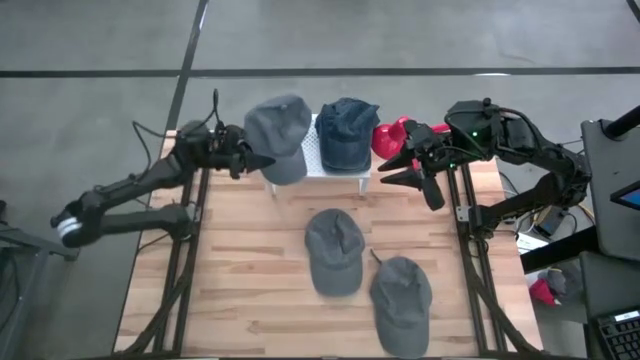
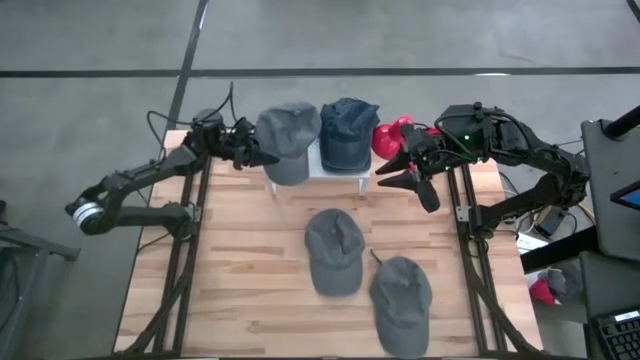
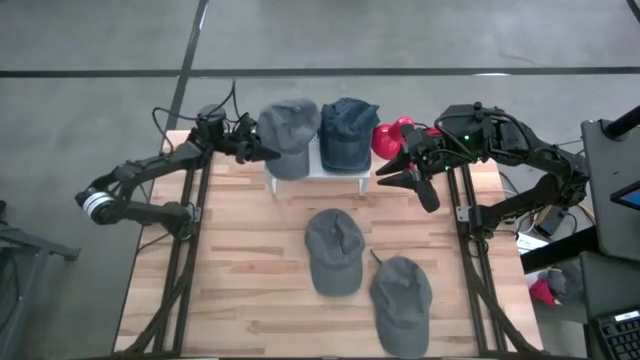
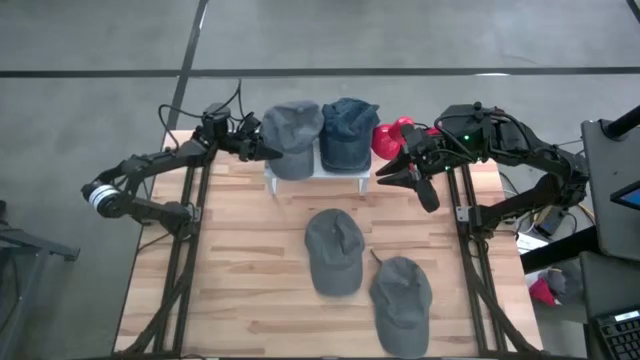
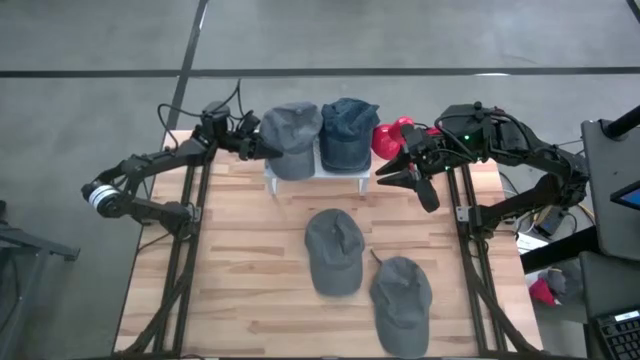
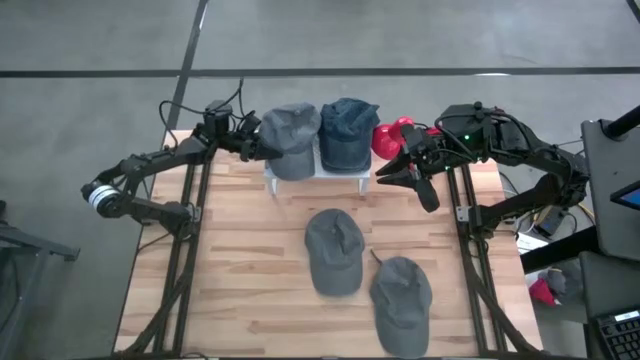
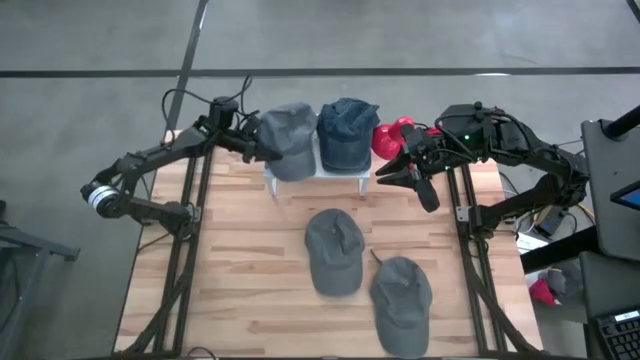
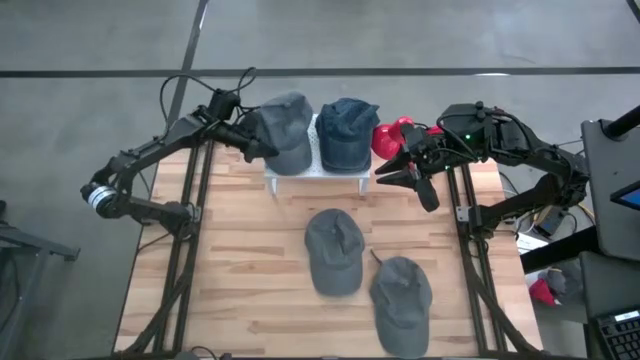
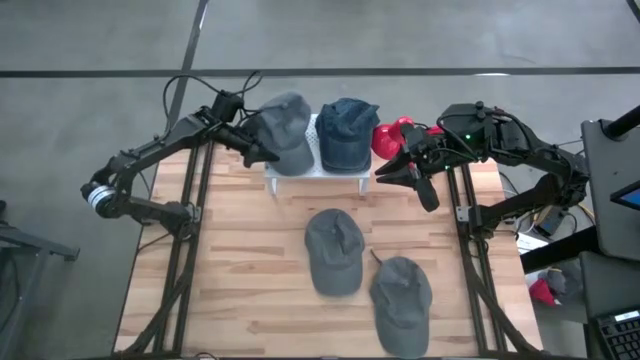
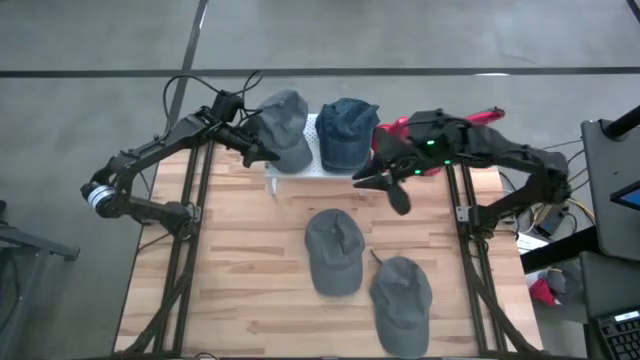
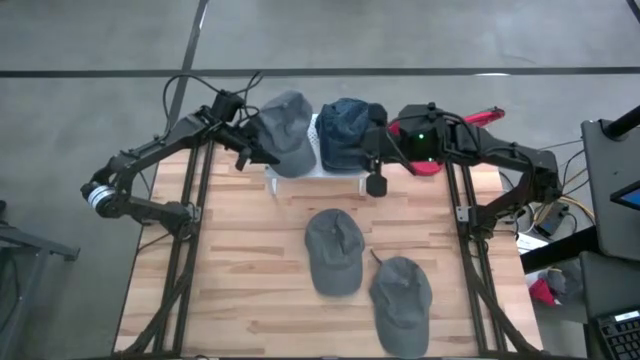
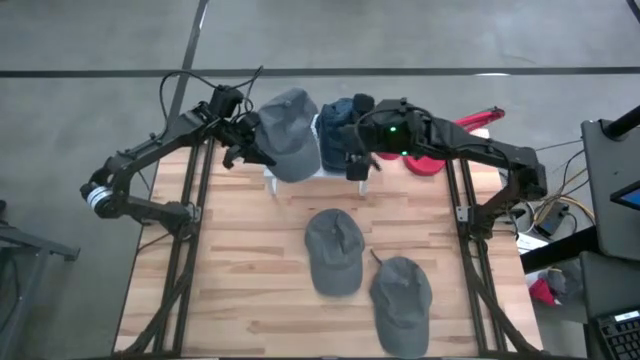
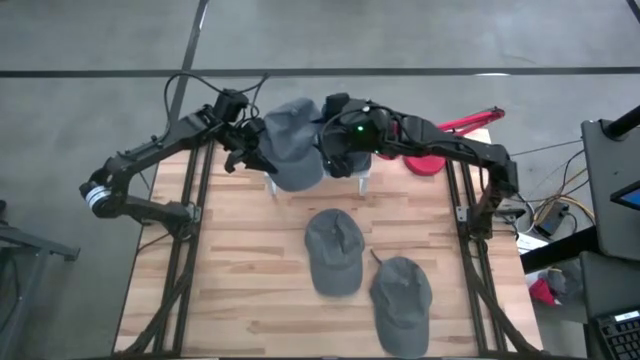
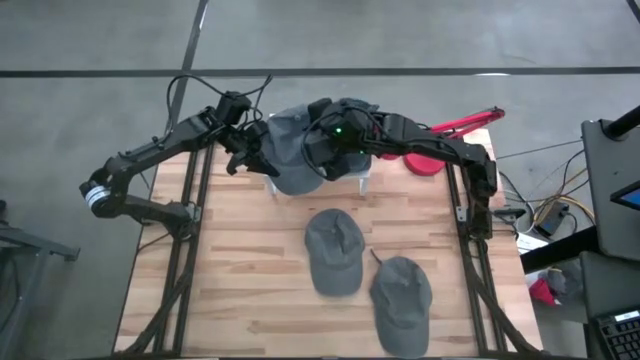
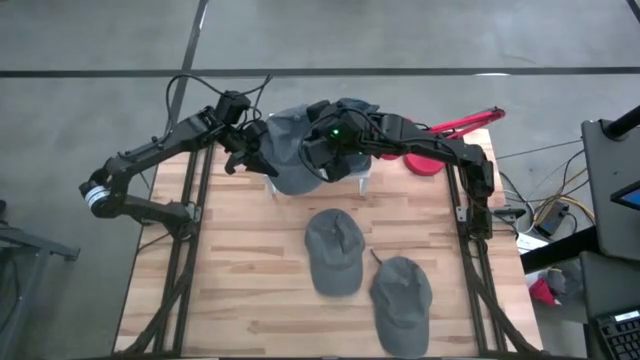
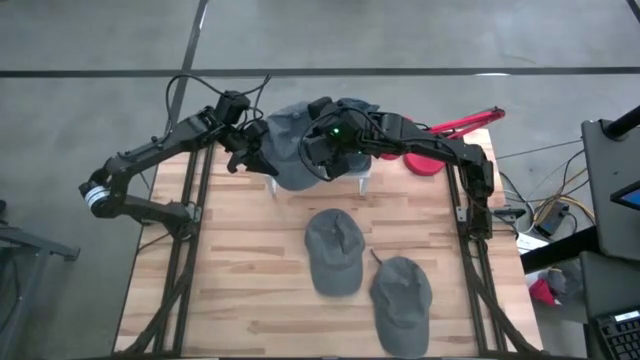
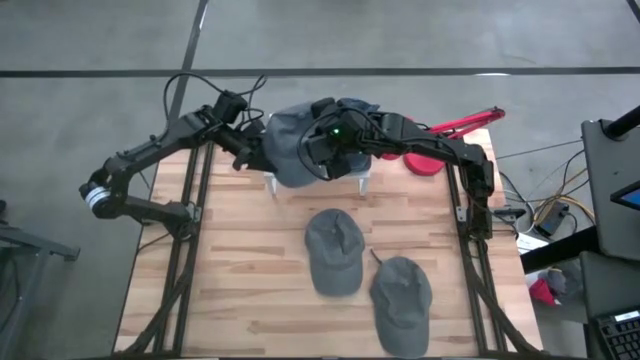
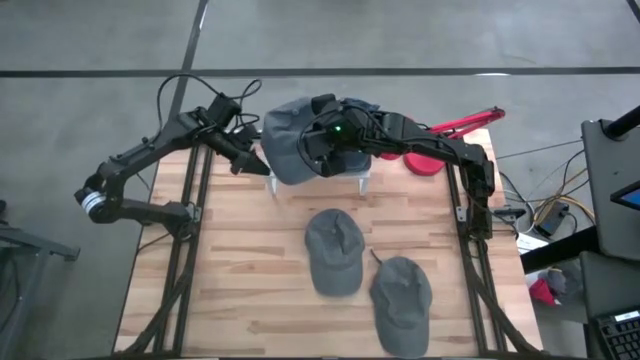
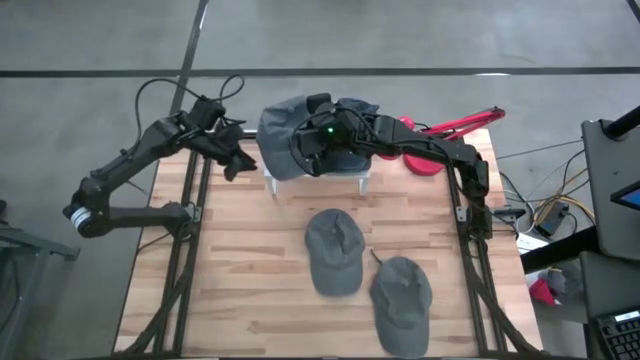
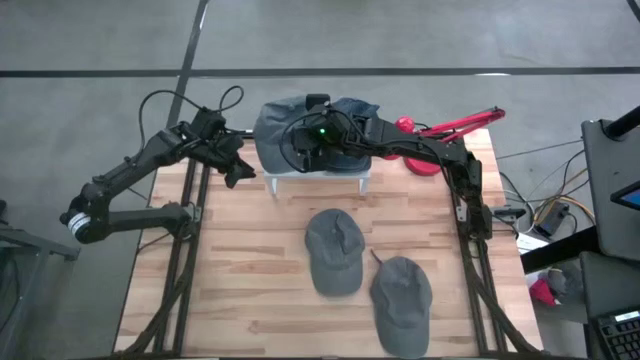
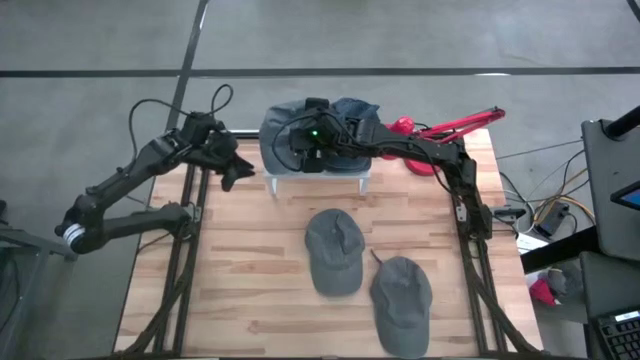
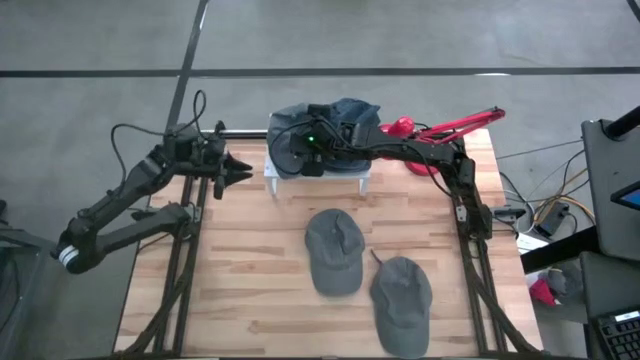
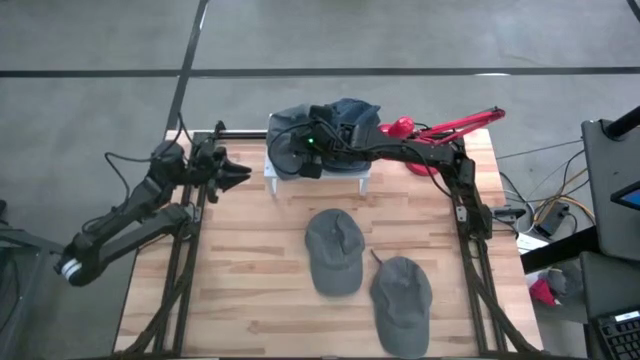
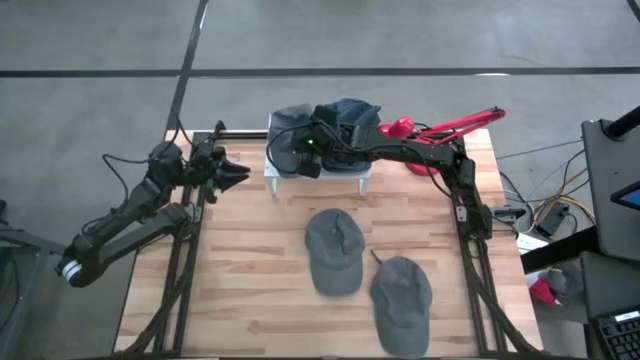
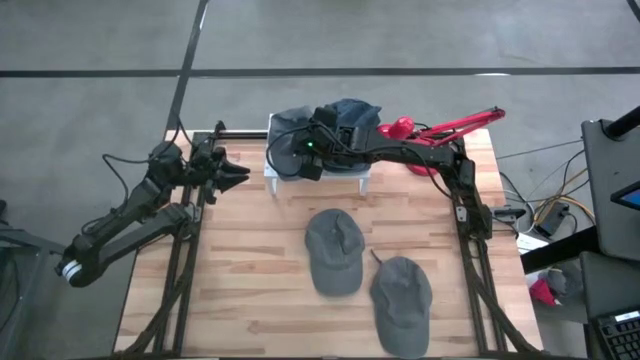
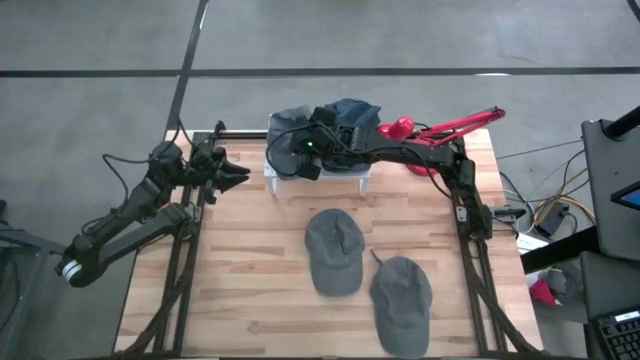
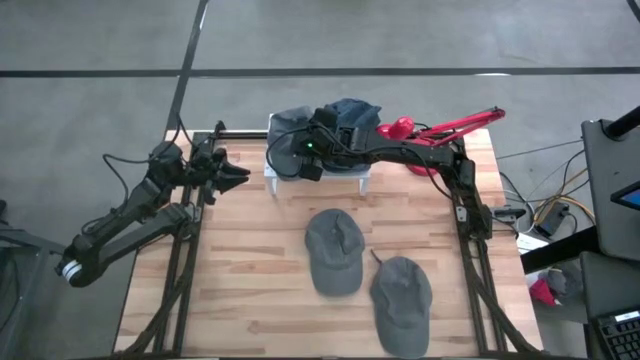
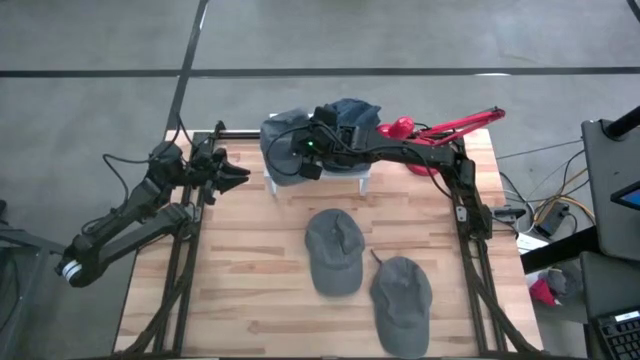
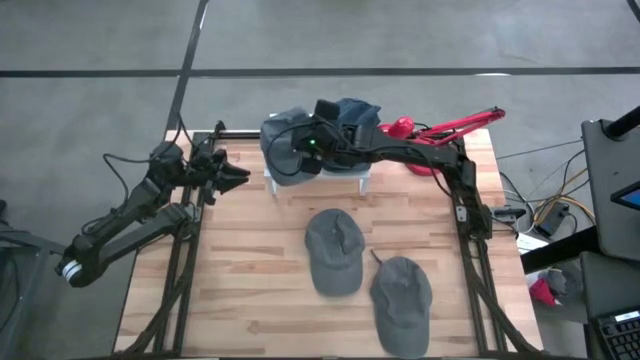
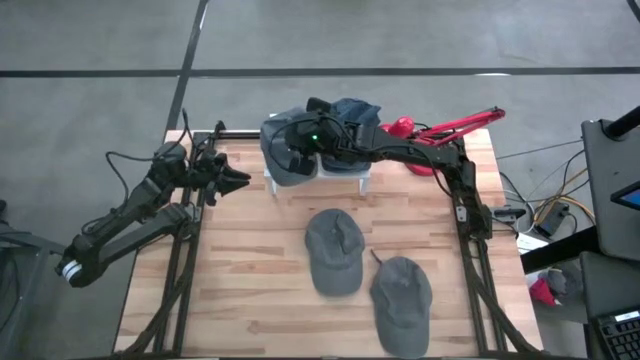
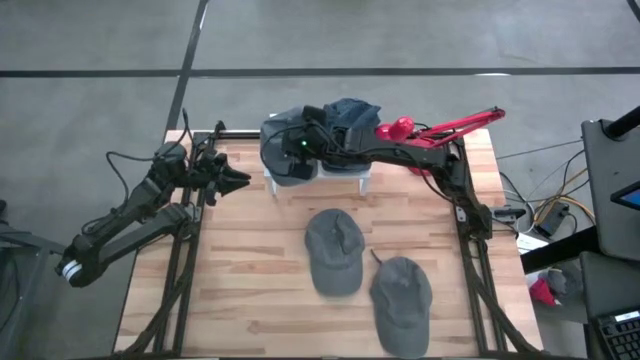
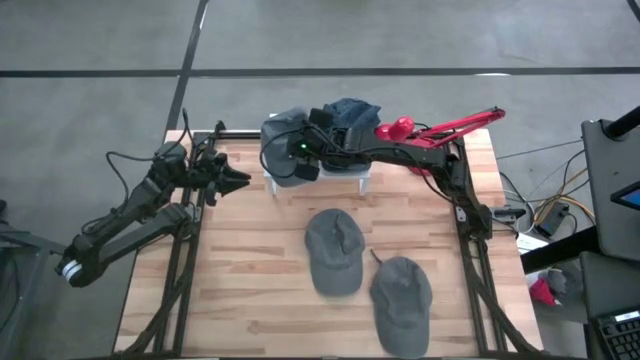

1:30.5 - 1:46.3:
Task: Pick & Place hat
Put the top right gray cap on the shelf

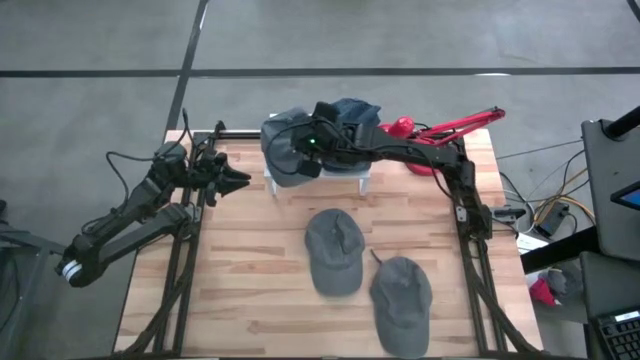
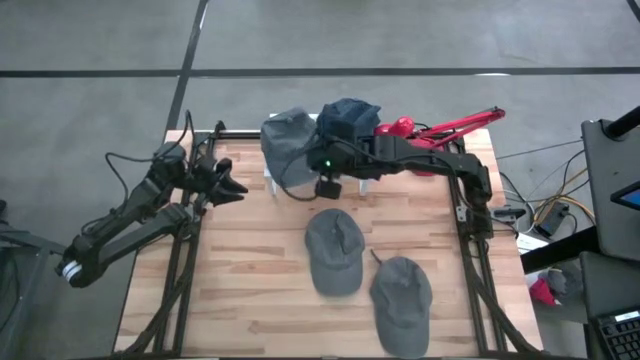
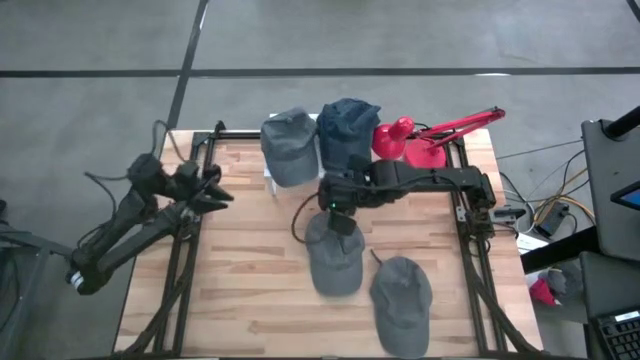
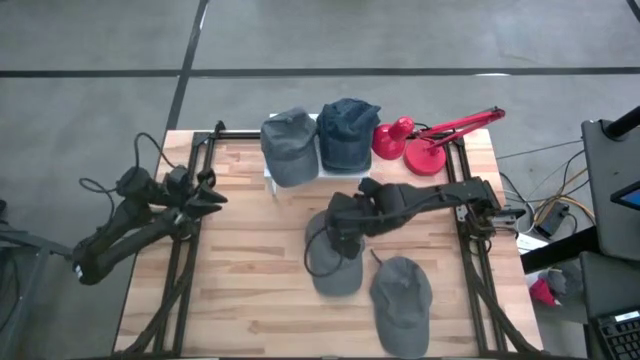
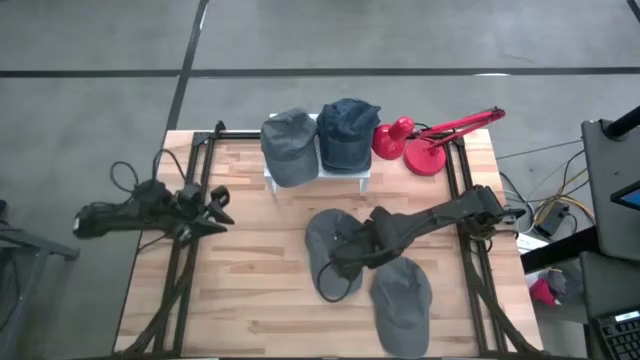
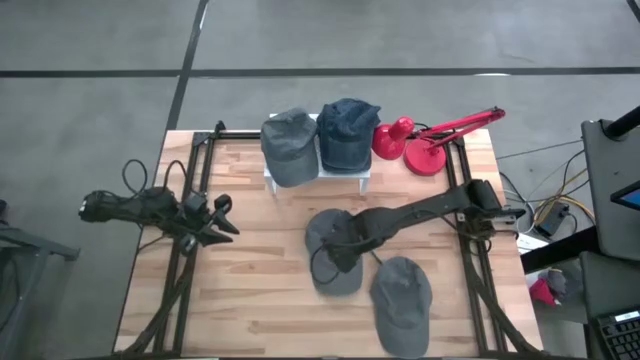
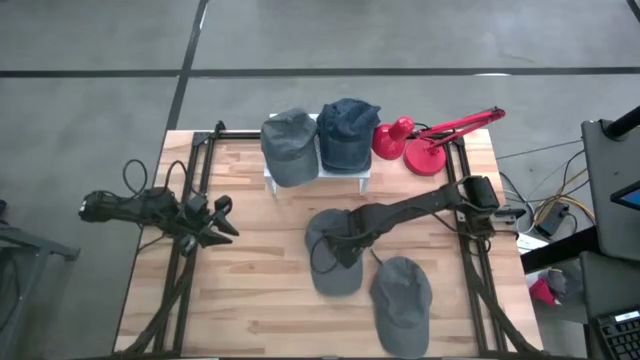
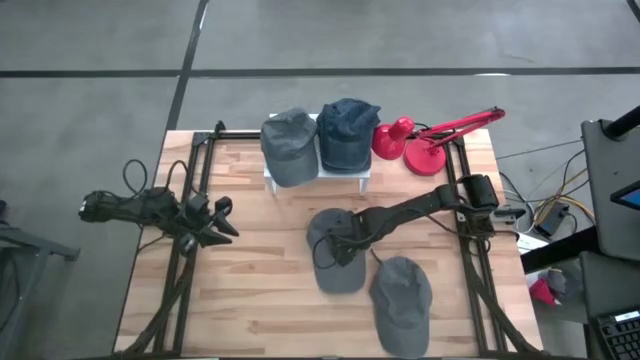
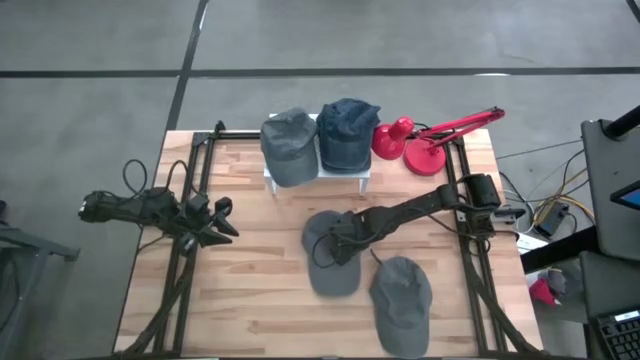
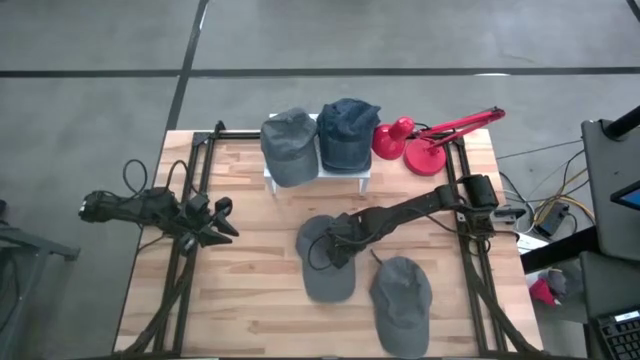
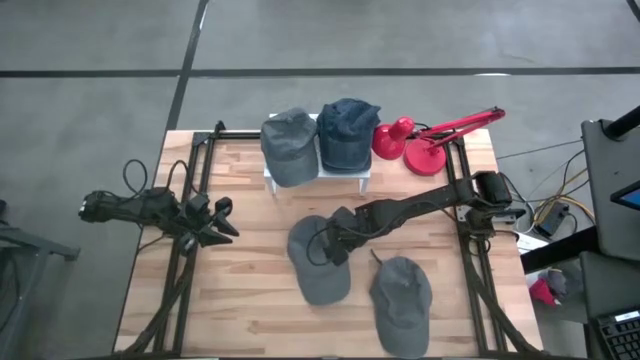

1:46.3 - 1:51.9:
Stack the top gray cap on top of the gray cap on the shelf

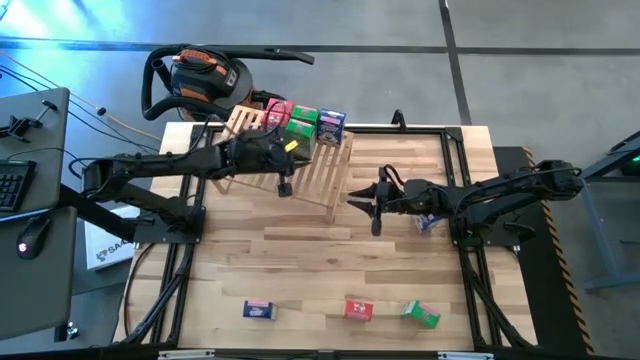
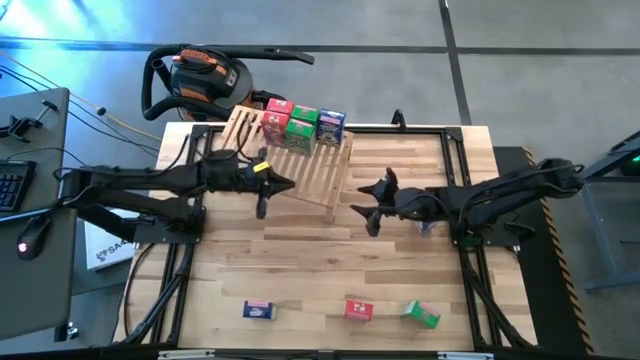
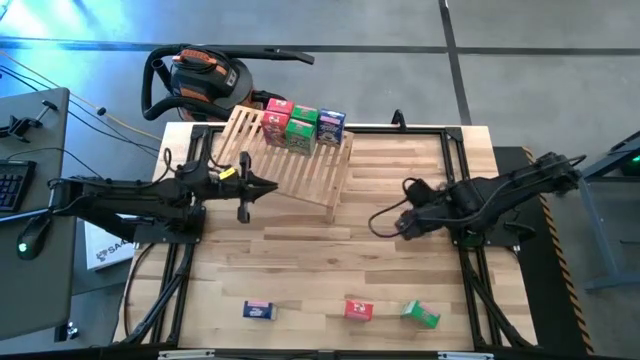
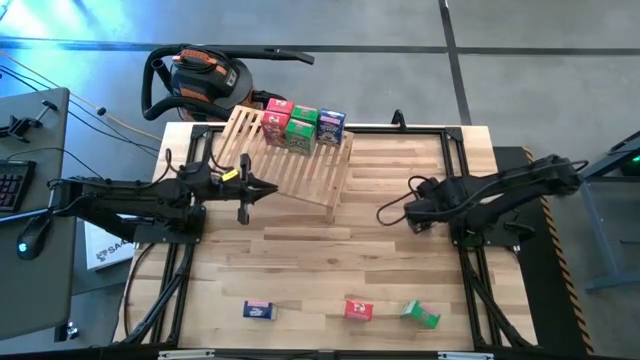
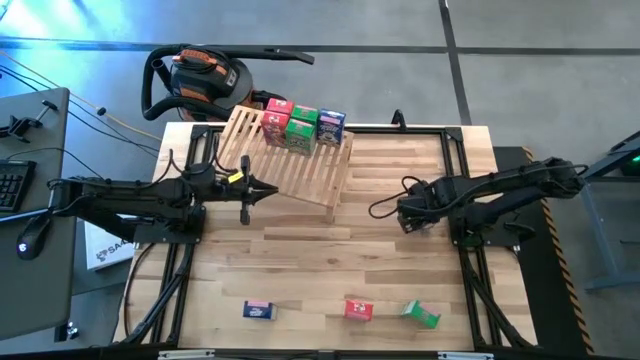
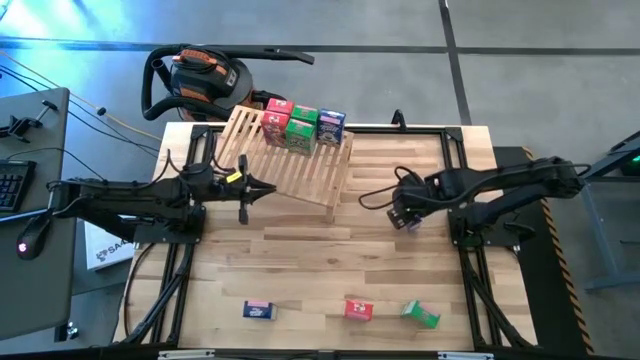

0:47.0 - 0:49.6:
Task: Stack cereal on shelf
Put the right blue cereal box aligned with the other blue cereal box on the shelf
